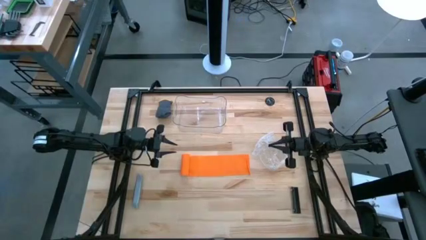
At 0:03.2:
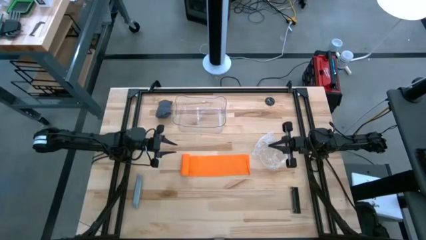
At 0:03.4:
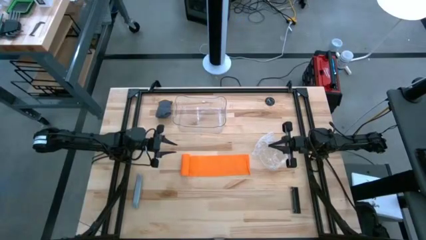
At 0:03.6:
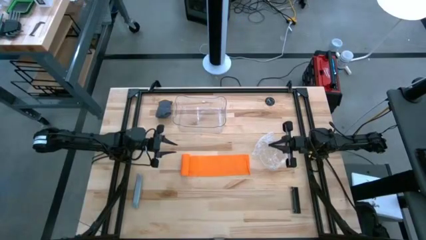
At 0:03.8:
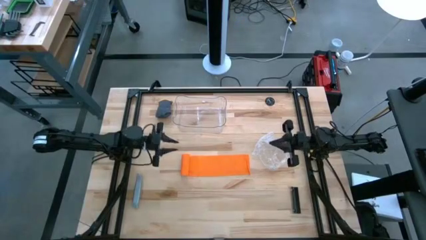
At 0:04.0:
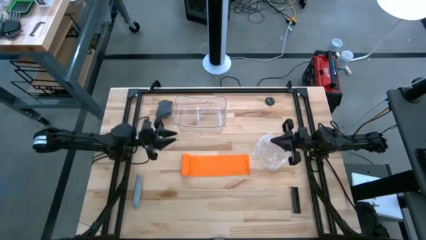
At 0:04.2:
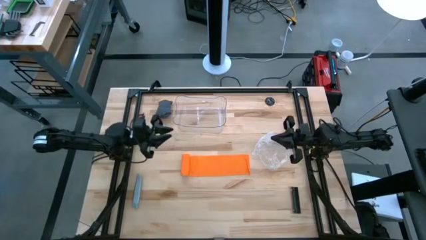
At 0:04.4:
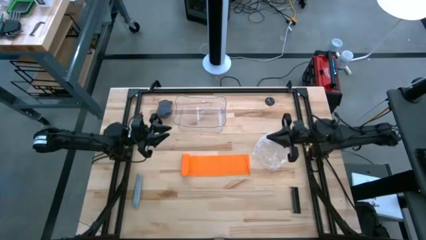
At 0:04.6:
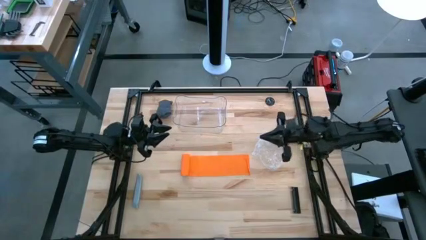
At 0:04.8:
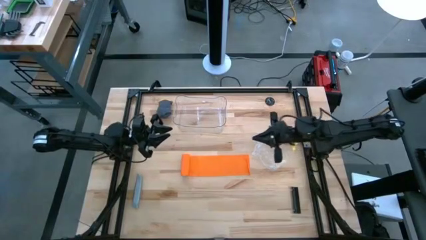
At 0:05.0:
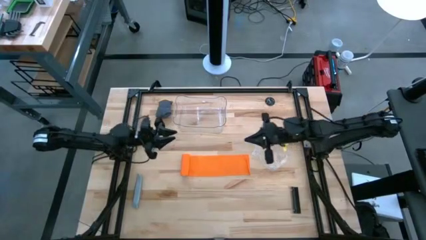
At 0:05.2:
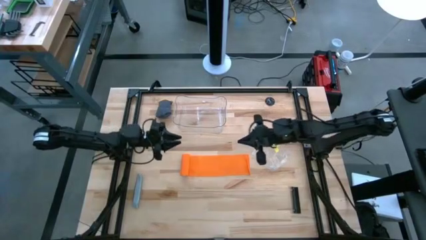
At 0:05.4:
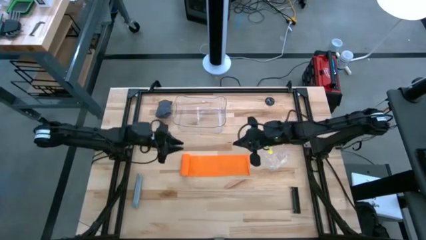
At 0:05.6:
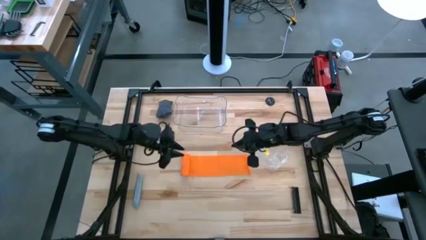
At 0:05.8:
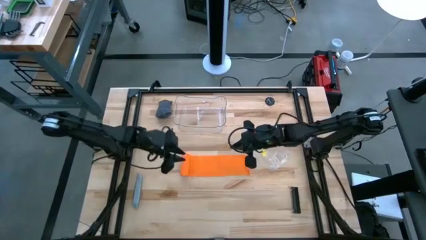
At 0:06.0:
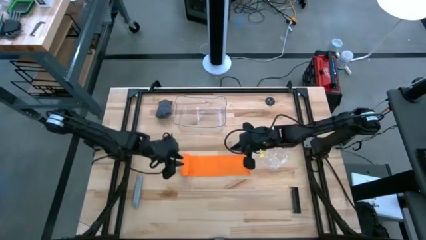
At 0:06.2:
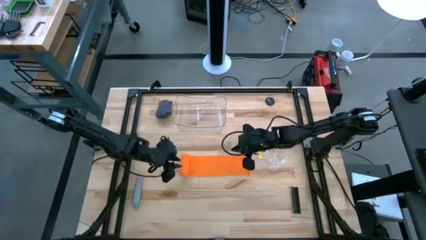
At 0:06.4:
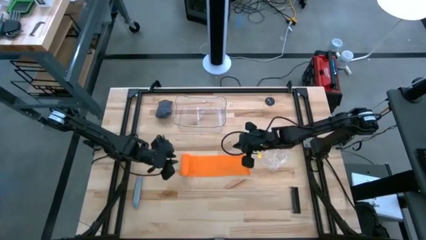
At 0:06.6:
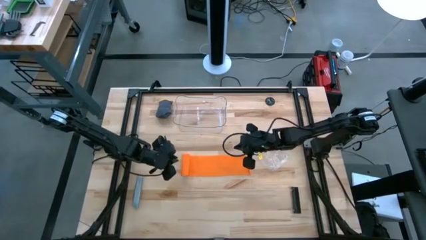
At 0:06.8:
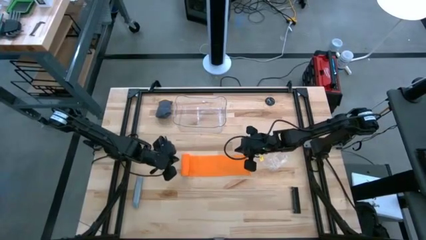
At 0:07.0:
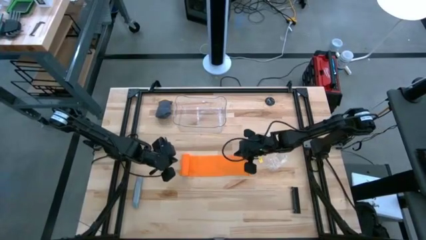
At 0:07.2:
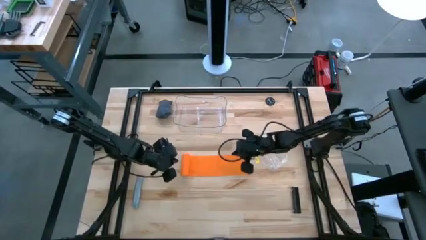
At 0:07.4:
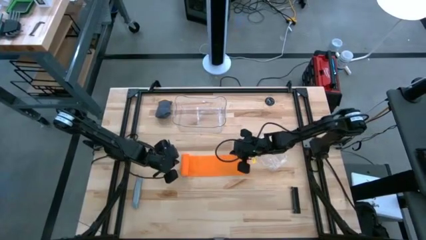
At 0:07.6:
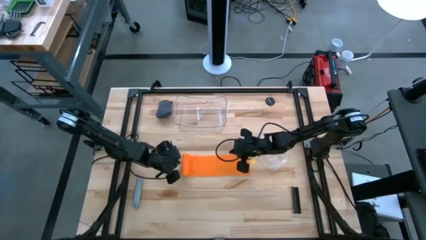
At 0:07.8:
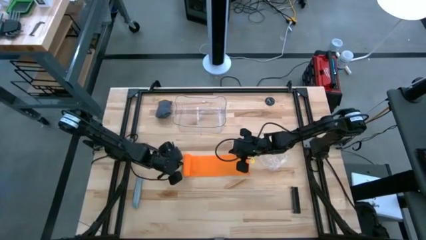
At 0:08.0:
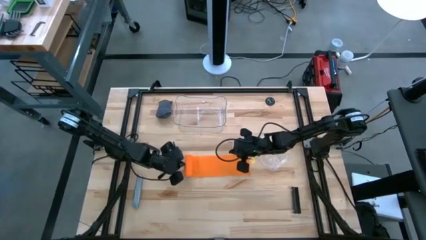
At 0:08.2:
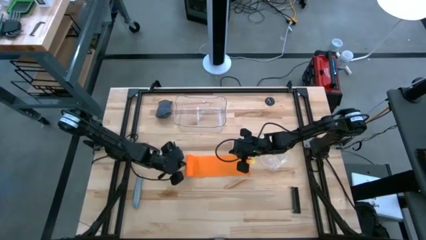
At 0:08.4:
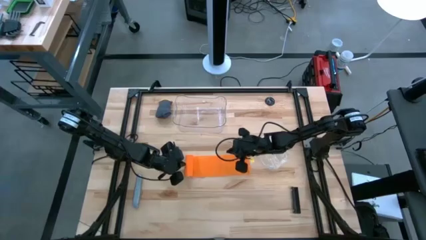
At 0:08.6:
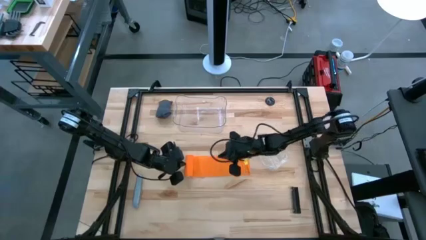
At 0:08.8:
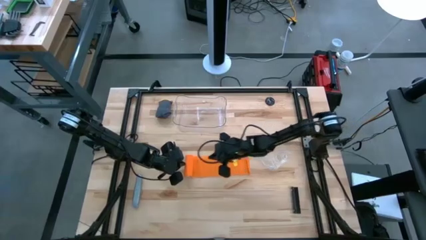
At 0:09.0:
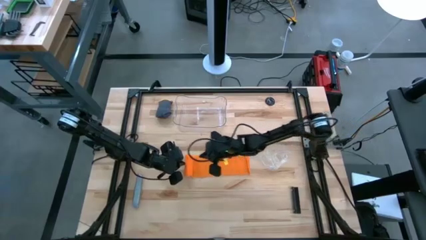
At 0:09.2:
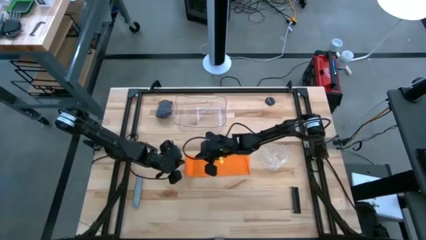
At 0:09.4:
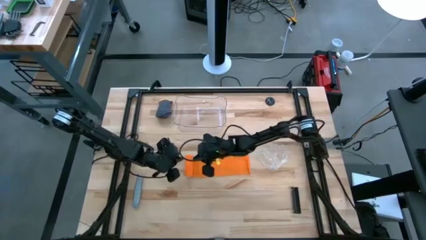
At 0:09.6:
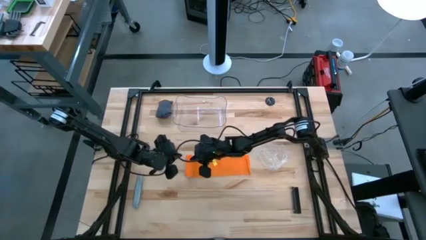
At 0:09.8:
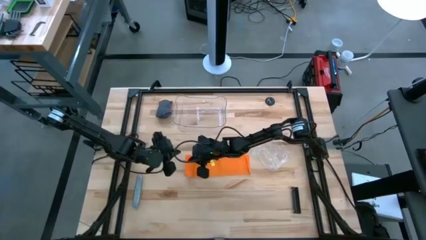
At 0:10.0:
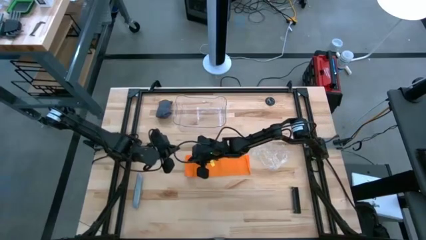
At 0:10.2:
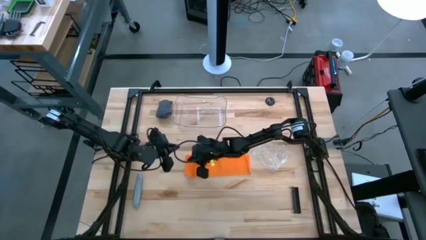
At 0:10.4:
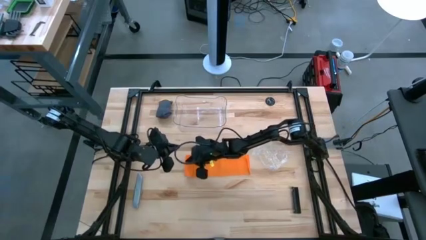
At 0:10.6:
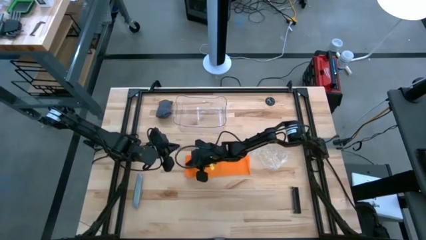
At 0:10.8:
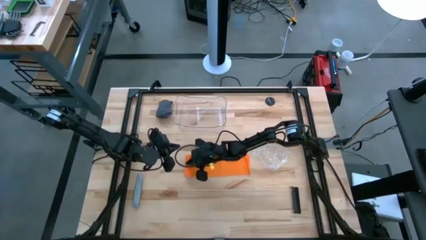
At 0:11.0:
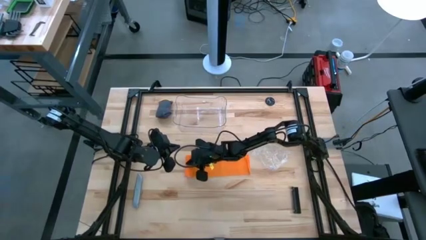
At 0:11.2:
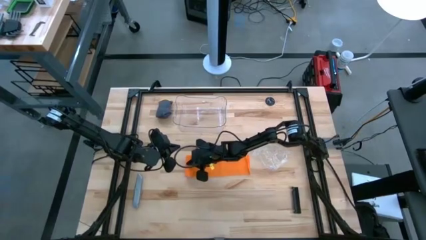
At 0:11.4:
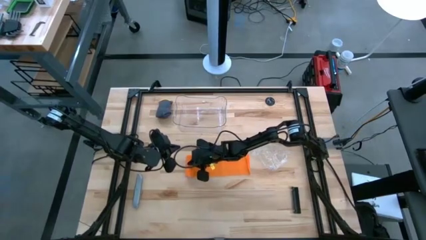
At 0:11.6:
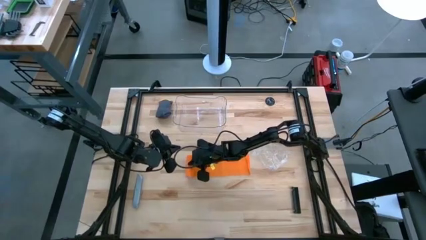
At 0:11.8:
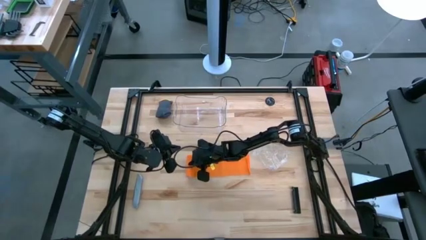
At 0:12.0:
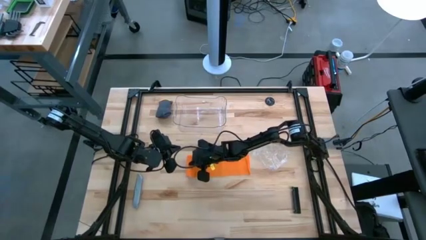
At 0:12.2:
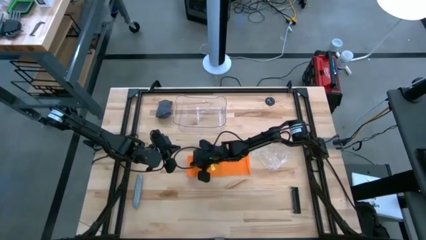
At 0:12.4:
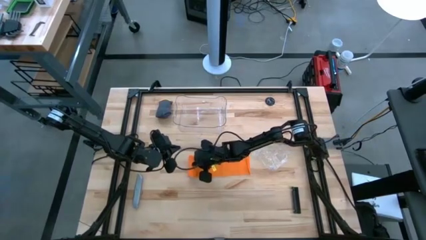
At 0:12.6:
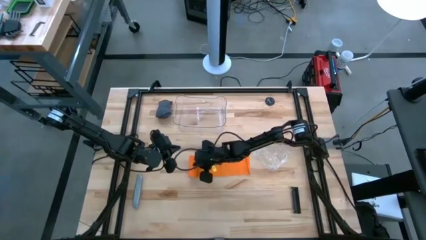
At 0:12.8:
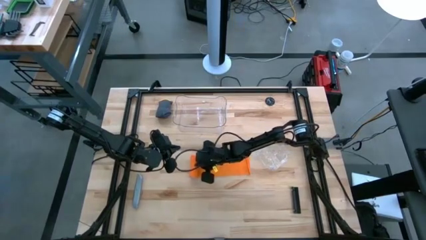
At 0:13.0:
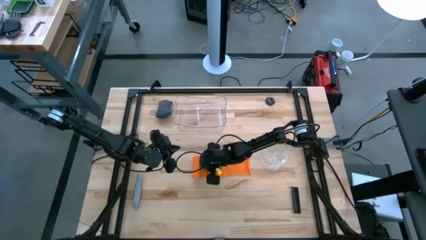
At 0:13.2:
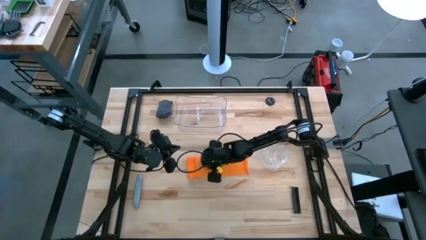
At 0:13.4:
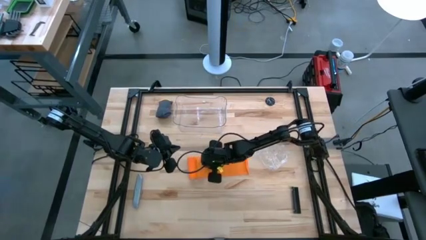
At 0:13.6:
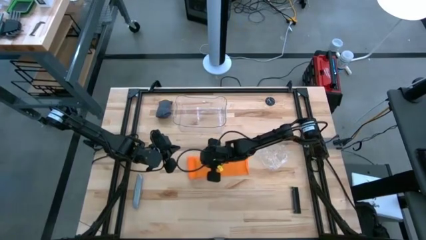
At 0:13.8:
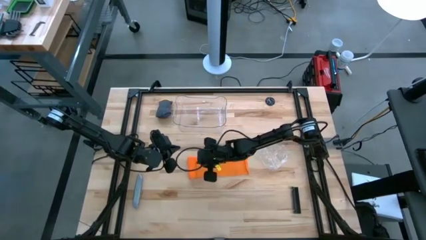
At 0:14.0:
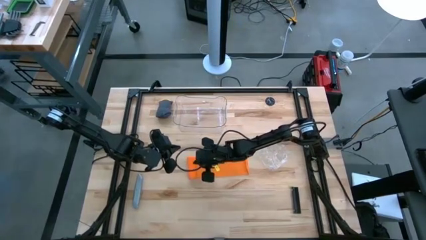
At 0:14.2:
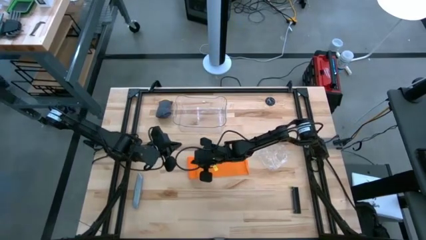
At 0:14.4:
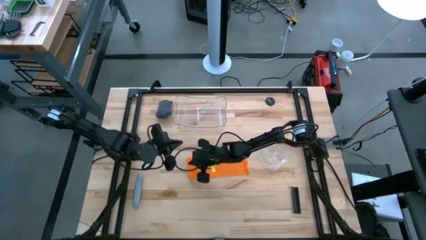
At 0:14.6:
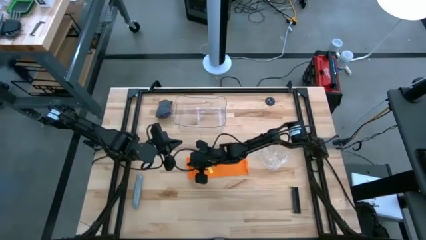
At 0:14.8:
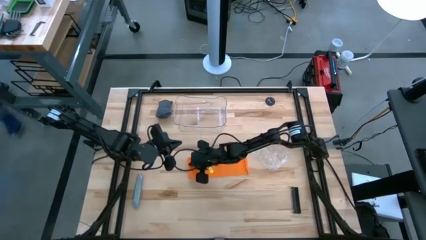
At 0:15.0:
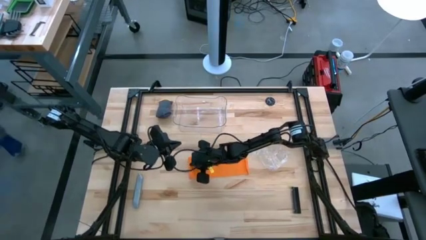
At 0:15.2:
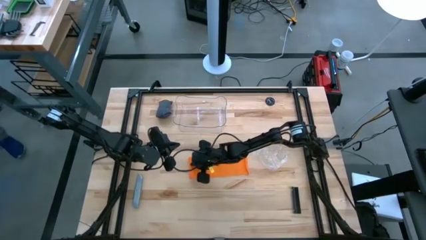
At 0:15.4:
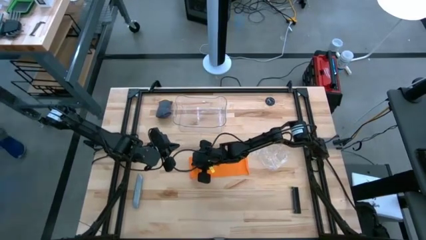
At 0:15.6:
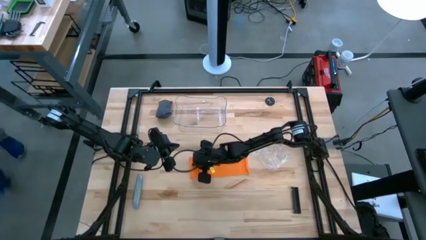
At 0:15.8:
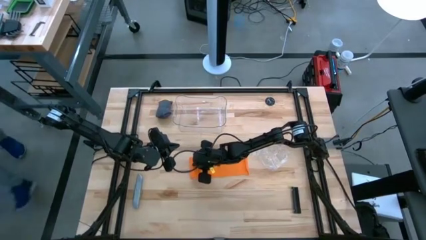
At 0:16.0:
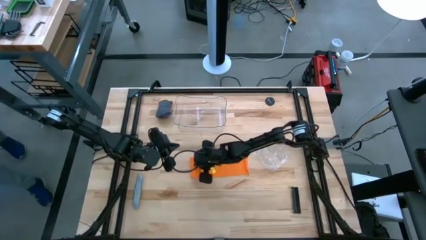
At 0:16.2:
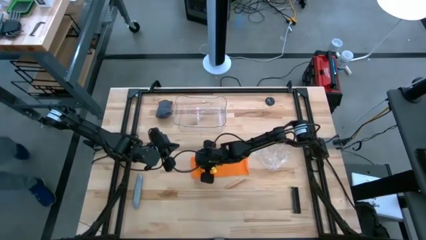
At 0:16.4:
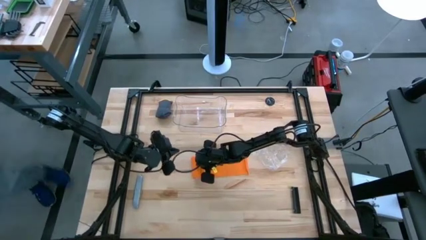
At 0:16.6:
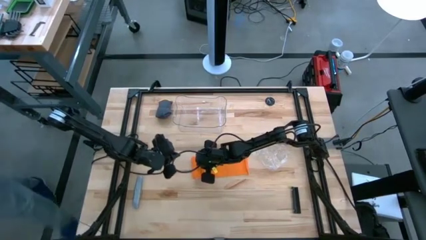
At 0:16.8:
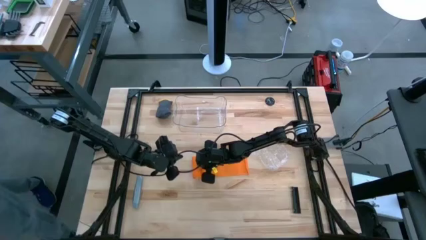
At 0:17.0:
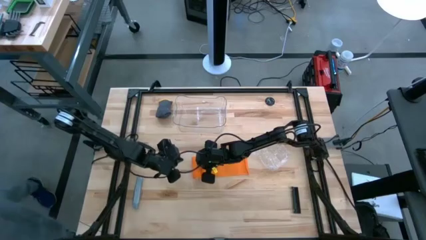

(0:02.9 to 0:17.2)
Task: Roll bandage
Roll the orange bandage
